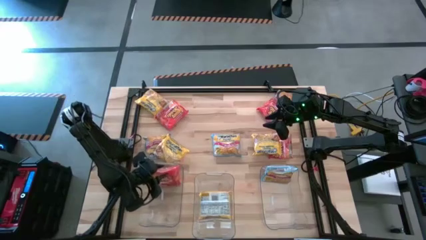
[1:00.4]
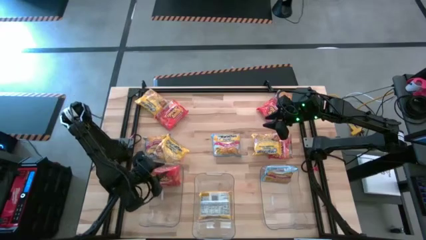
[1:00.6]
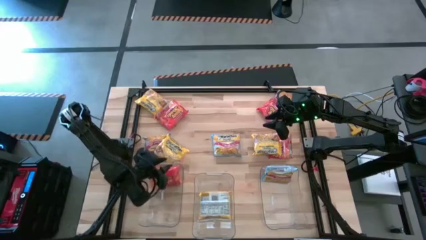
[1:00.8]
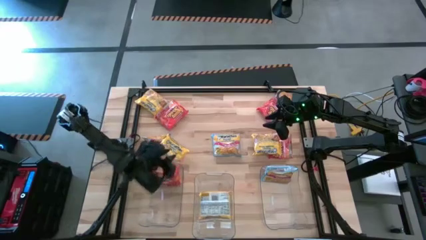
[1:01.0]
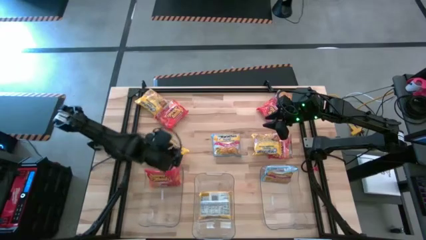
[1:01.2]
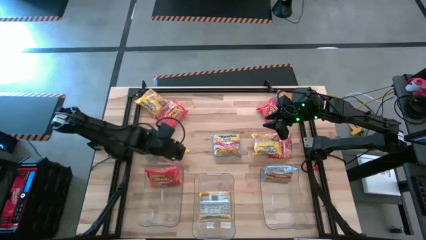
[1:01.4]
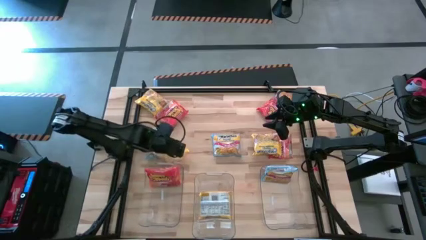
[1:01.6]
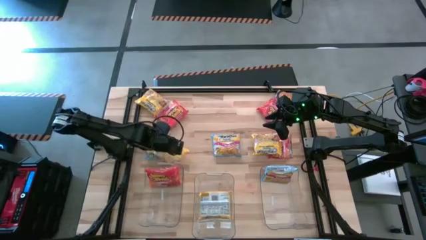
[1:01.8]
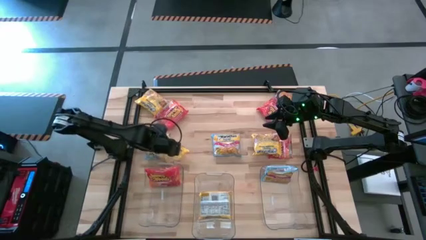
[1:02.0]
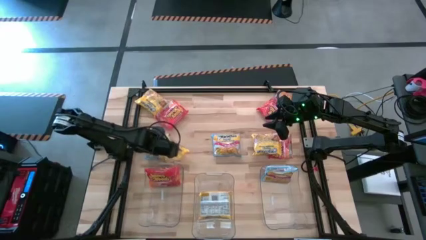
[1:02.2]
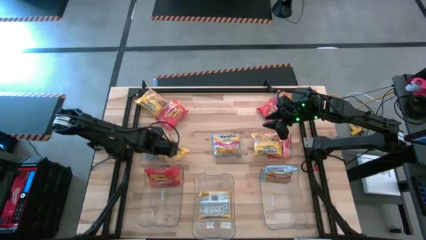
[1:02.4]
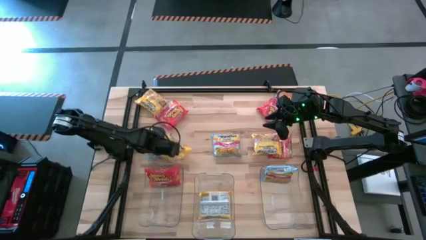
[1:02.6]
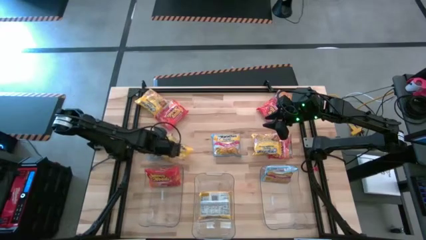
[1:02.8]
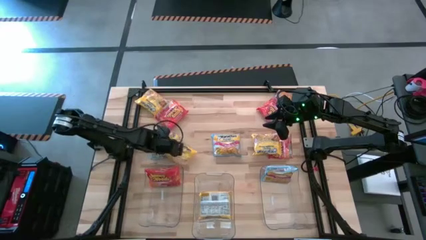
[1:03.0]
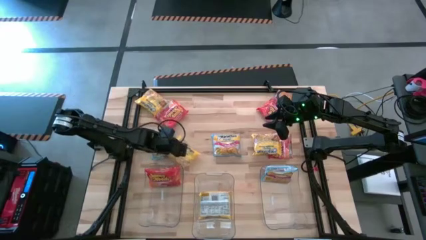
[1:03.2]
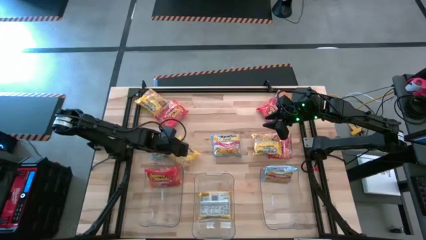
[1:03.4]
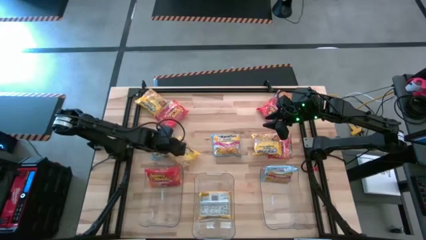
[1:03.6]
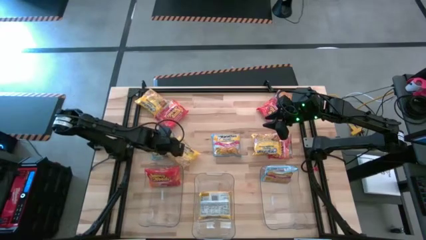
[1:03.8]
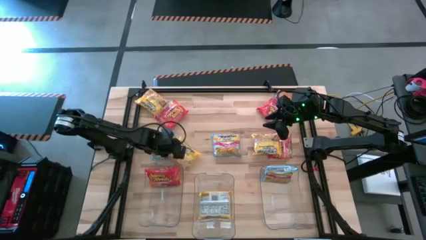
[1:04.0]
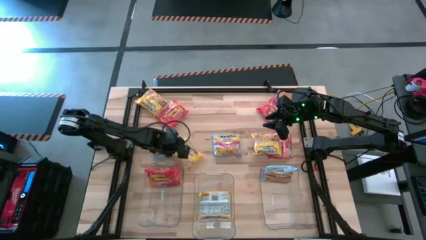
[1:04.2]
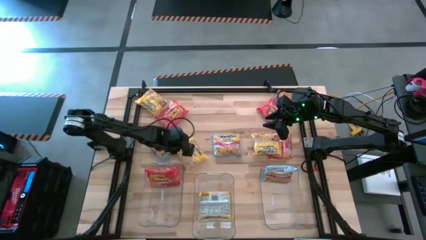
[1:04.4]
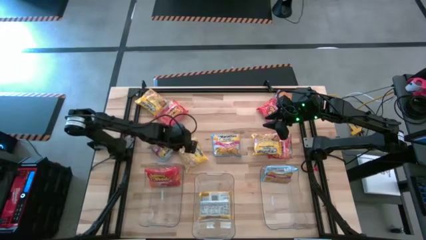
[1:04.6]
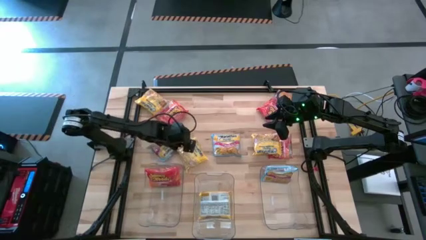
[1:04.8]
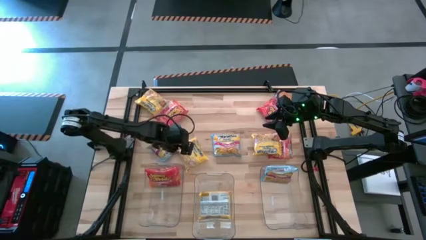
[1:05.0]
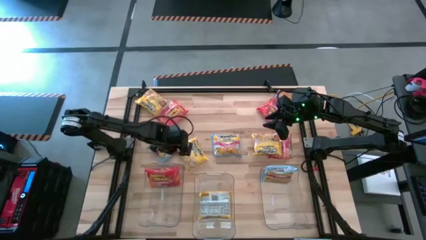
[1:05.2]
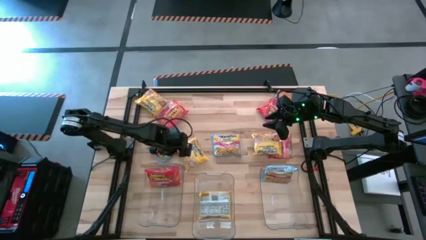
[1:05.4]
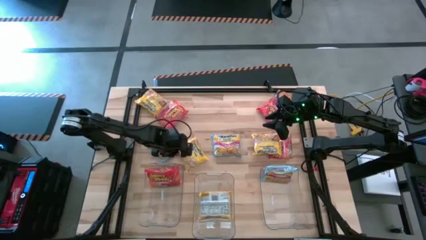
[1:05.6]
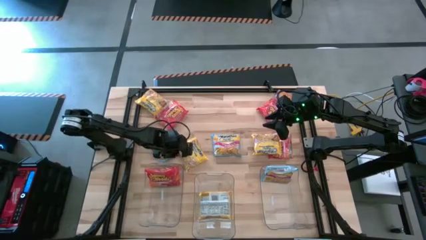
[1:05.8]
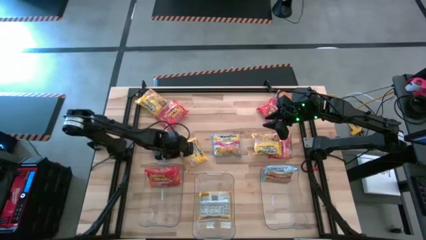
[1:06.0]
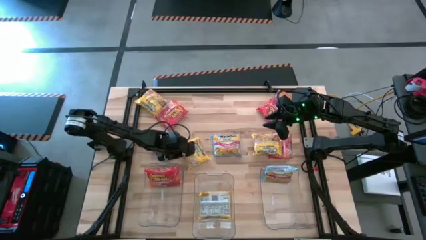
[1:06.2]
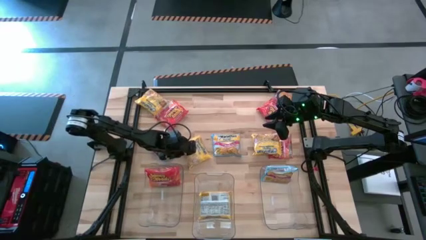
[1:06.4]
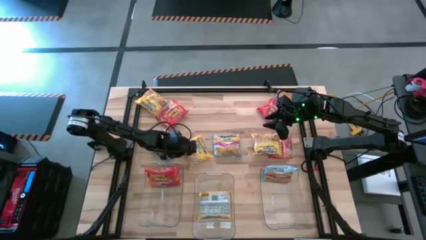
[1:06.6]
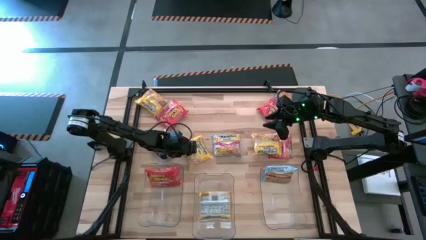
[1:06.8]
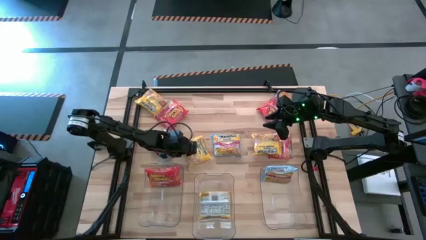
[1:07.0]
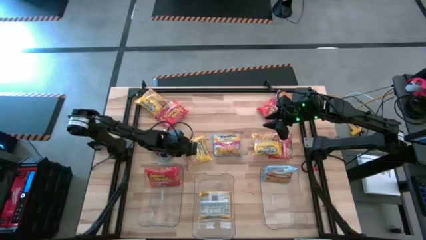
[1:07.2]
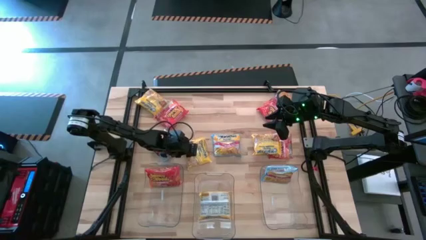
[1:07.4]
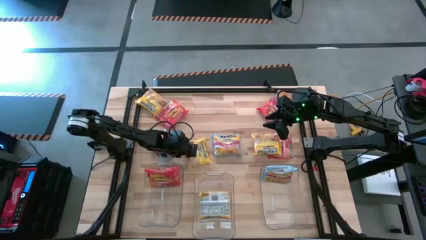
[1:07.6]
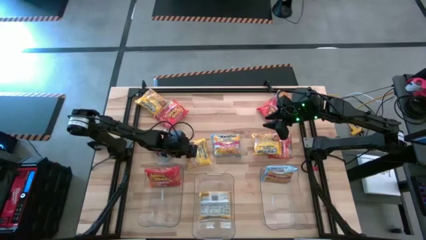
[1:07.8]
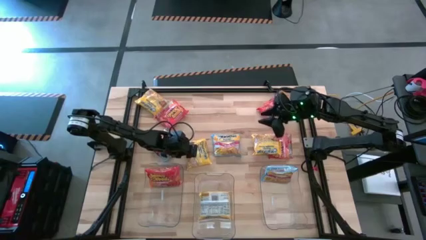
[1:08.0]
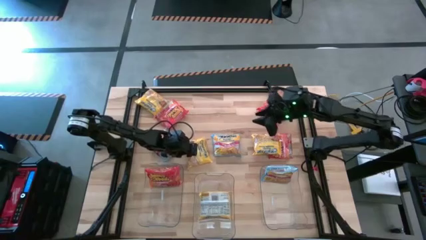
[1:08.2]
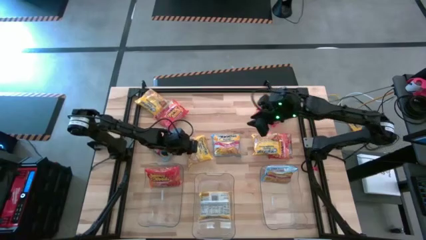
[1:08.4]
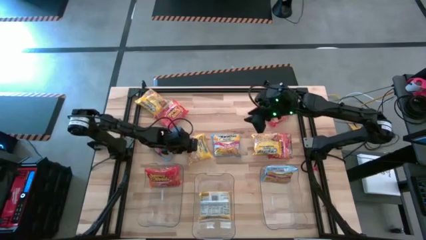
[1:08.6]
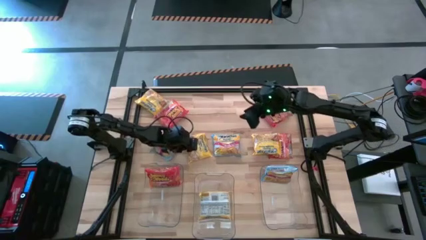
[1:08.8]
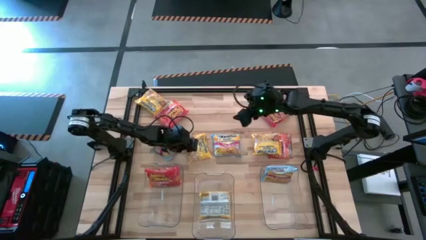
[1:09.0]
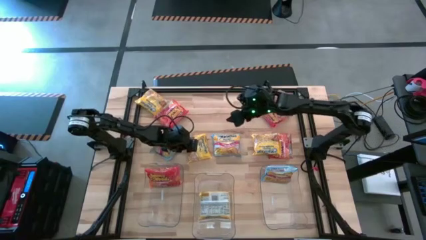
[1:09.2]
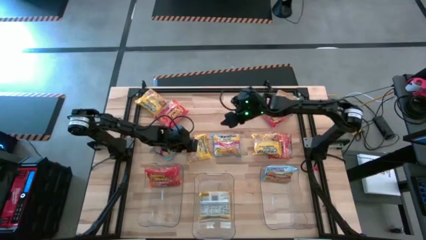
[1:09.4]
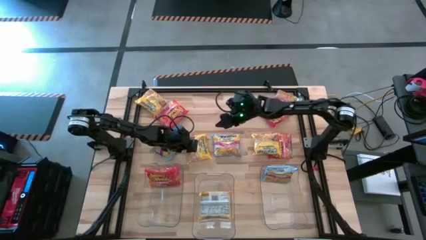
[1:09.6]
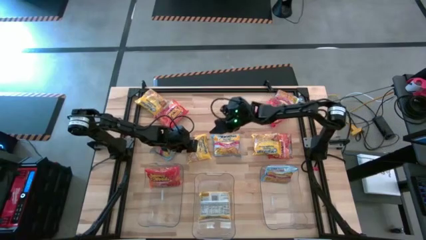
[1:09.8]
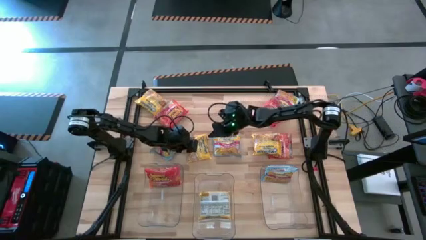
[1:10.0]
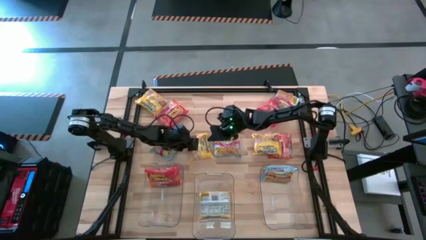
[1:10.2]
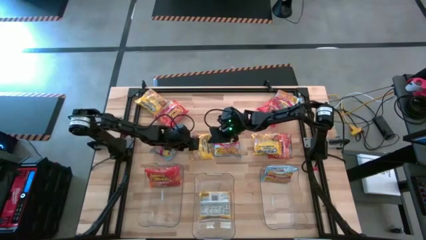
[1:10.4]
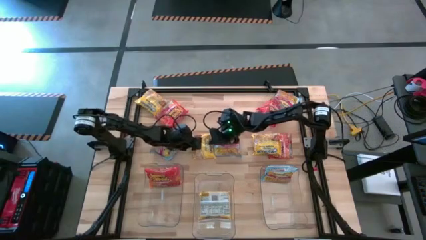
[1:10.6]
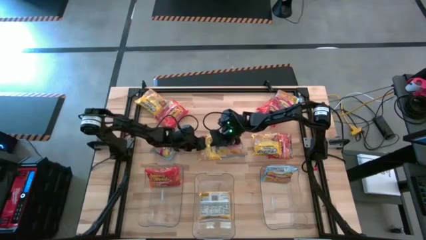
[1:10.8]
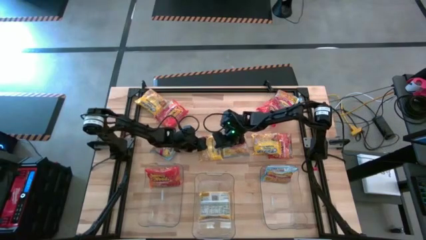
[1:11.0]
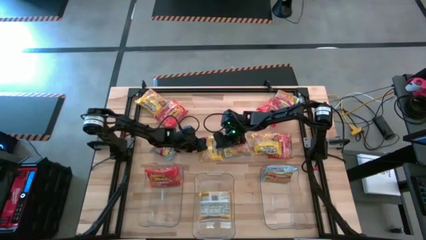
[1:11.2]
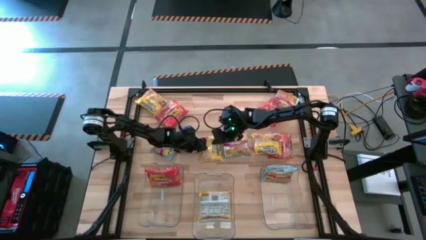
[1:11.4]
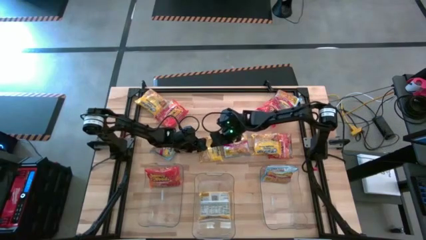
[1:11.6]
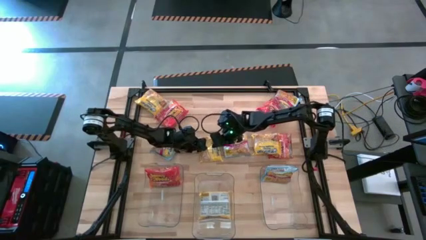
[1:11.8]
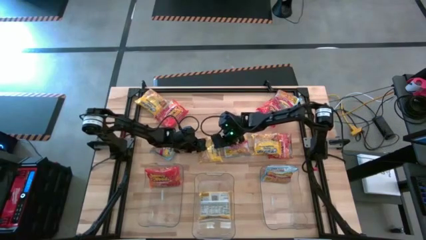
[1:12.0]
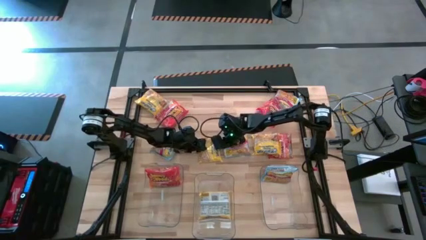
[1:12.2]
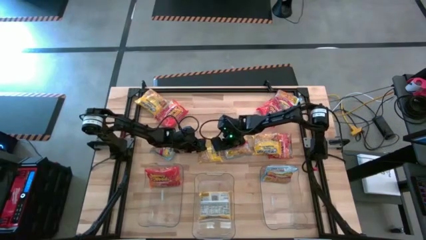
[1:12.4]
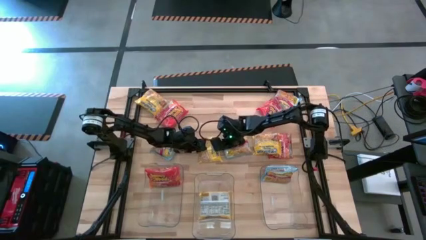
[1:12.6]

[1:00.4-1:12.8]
Task: Sort Maruchan noodles
Put the yellow noodle pack into the middle transparent bin
